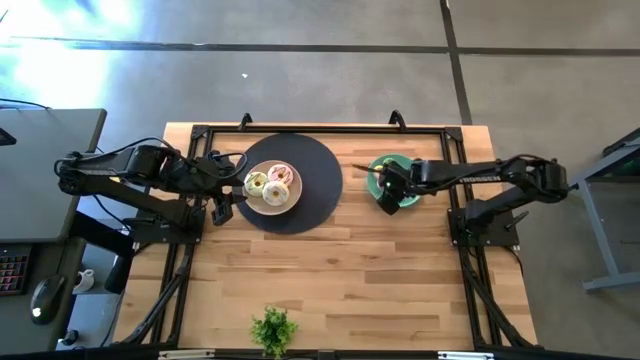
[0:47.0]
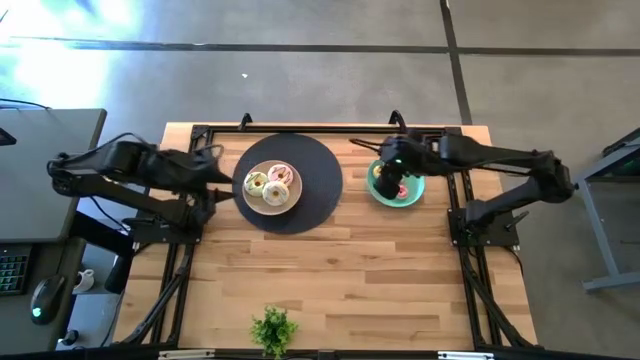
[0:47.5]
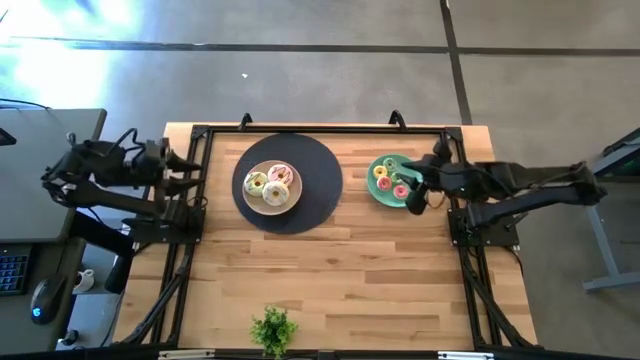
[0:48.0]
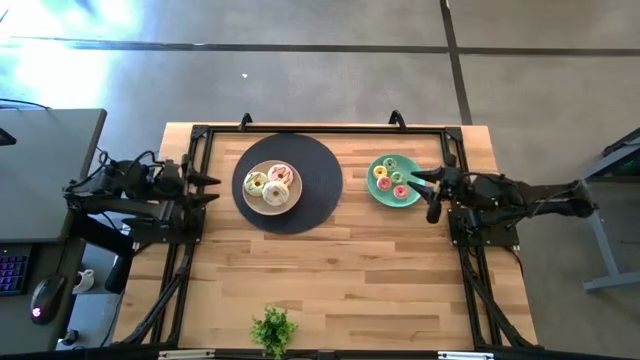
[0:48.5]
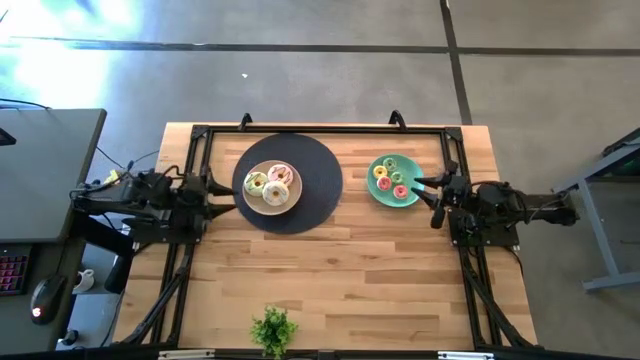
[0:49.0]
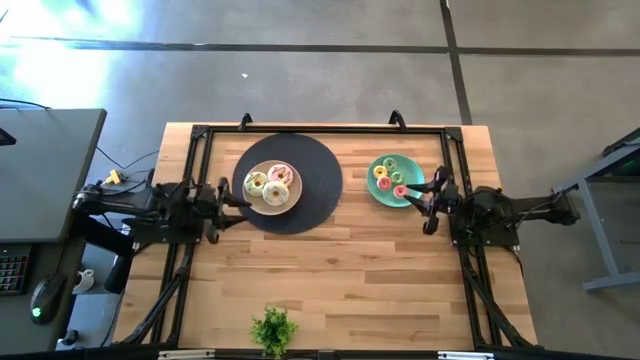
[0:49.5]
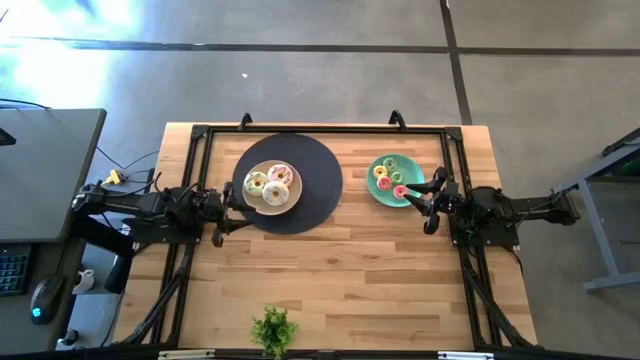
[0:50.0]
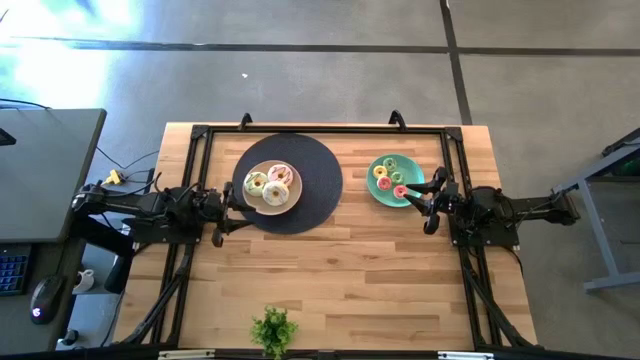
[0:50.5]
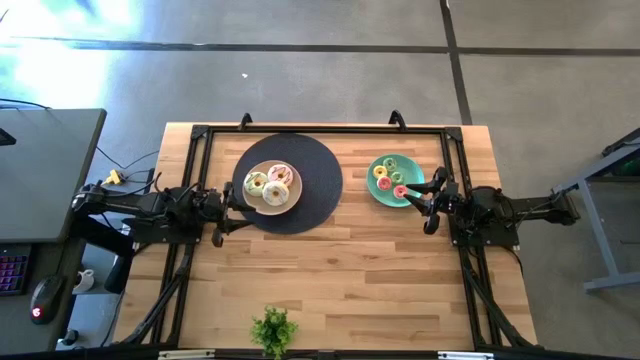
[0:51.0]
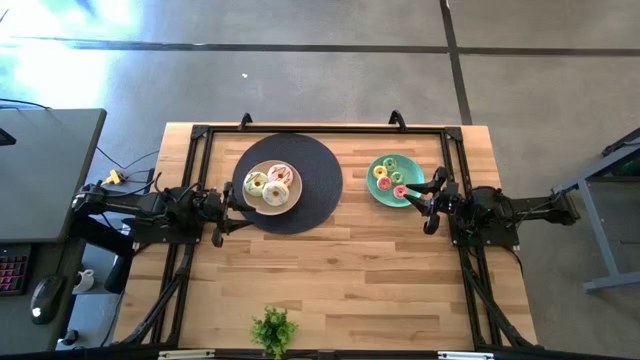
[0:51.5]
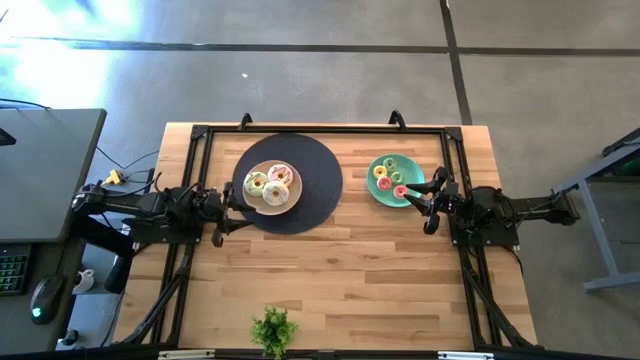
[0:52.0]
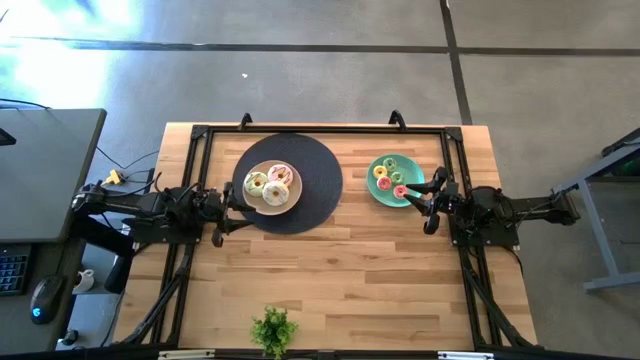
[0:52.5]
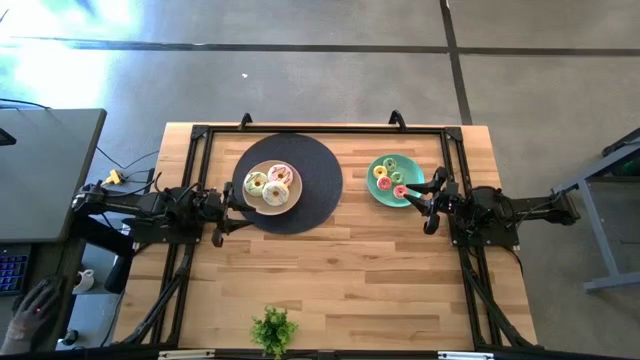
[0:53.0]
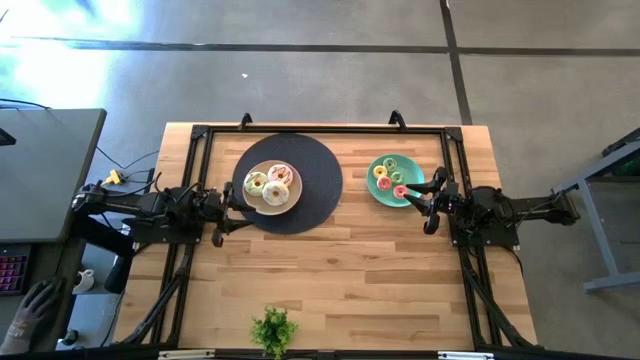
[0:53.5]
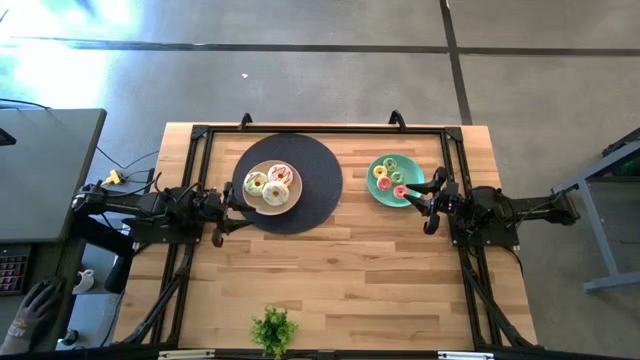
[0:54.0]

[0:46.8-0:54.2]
Task: Pick & Place donuts
Return to Home Position

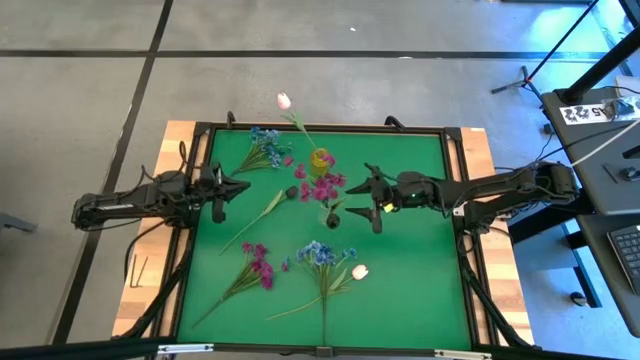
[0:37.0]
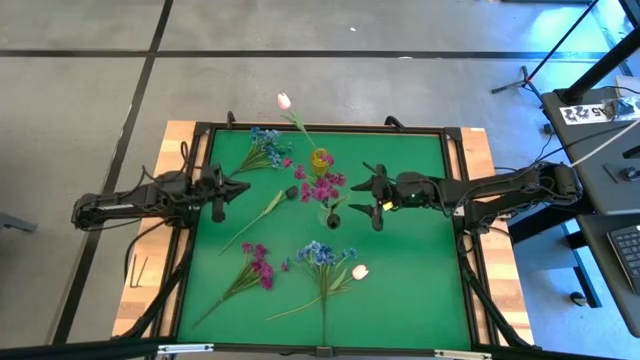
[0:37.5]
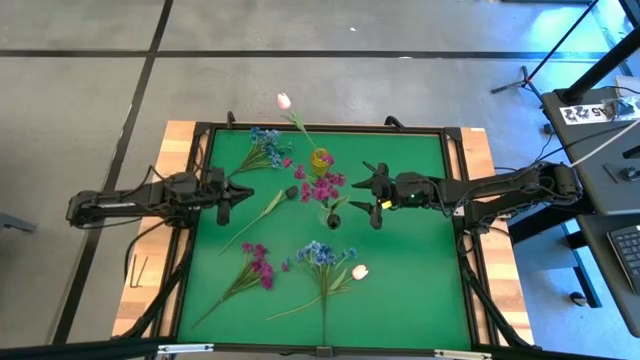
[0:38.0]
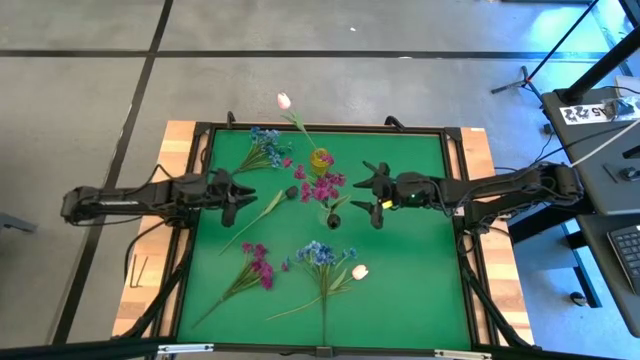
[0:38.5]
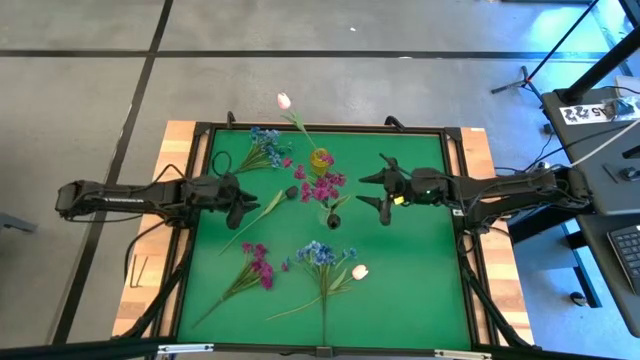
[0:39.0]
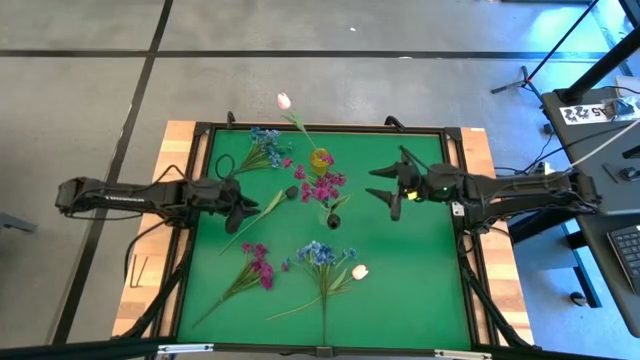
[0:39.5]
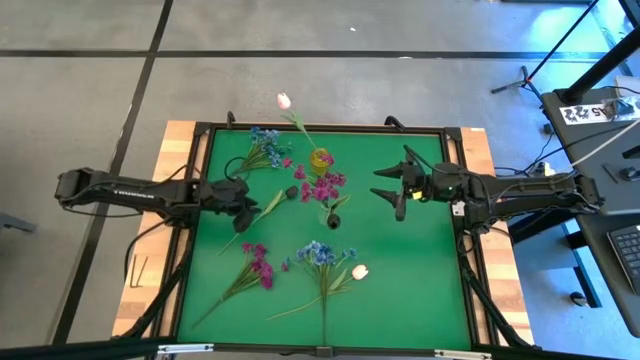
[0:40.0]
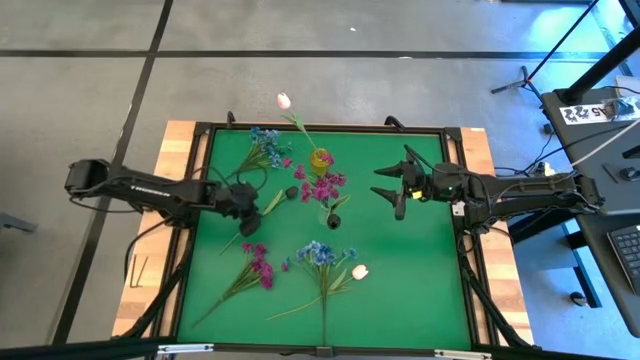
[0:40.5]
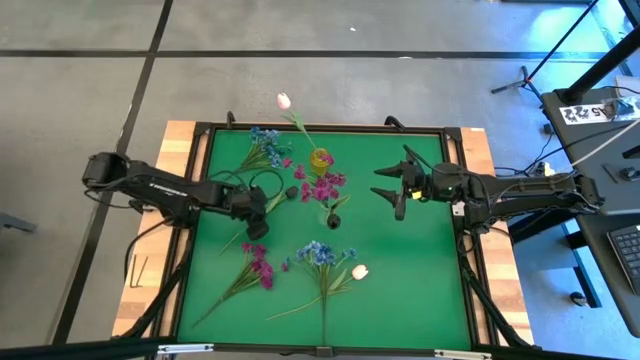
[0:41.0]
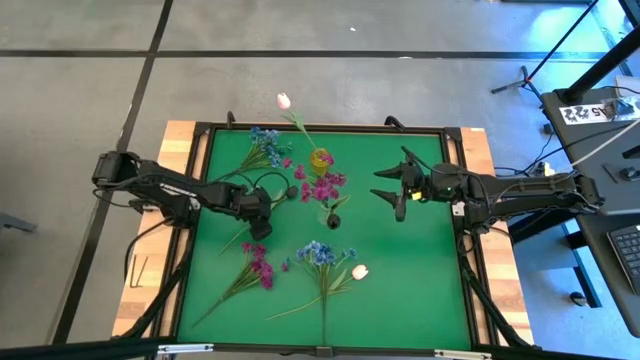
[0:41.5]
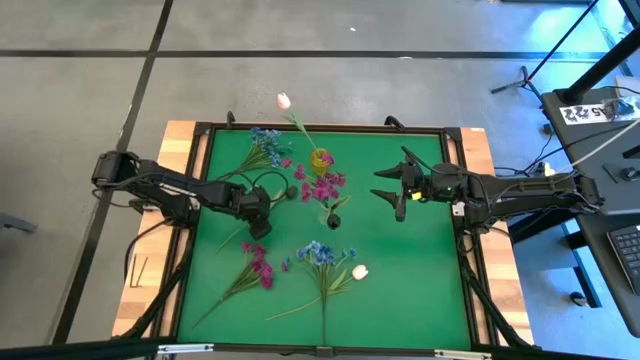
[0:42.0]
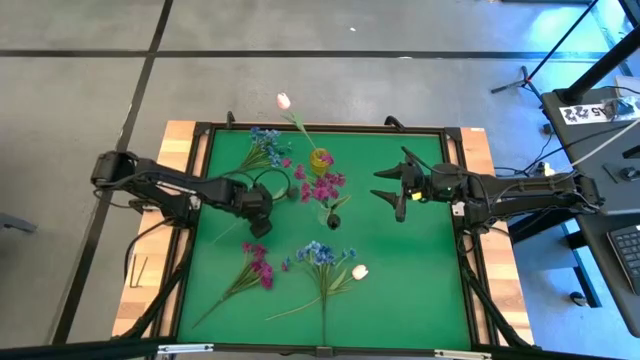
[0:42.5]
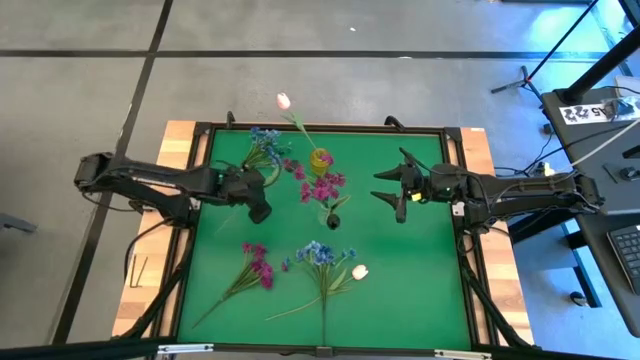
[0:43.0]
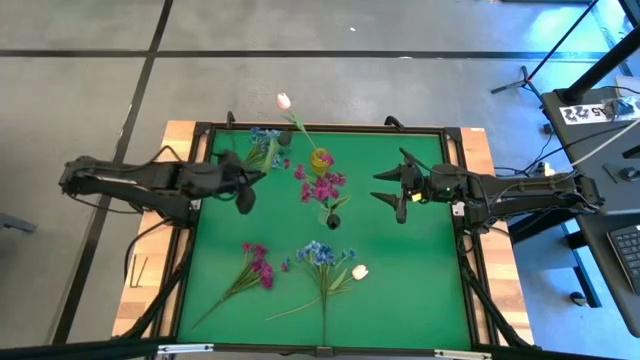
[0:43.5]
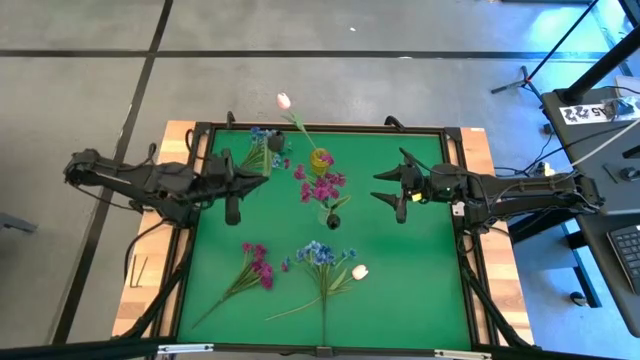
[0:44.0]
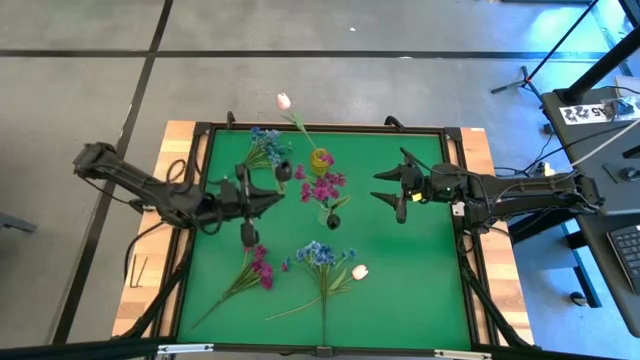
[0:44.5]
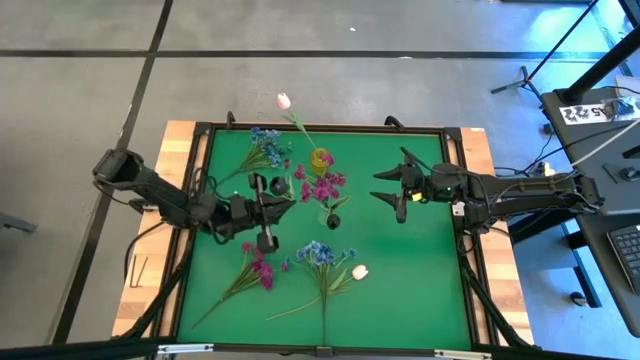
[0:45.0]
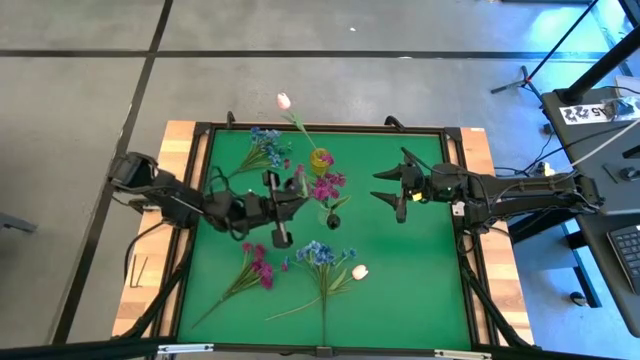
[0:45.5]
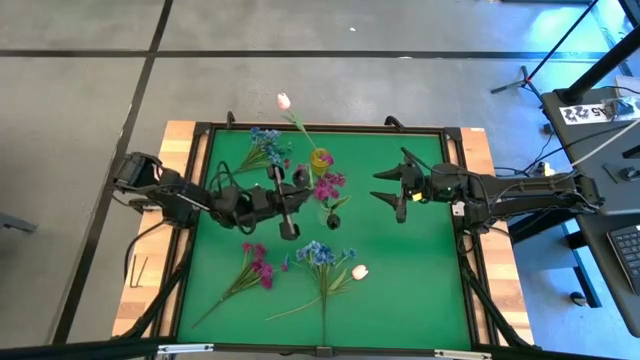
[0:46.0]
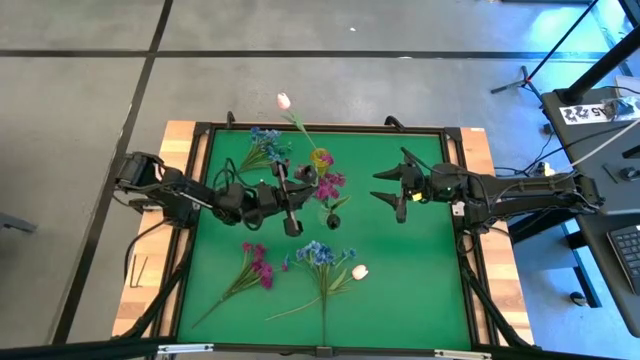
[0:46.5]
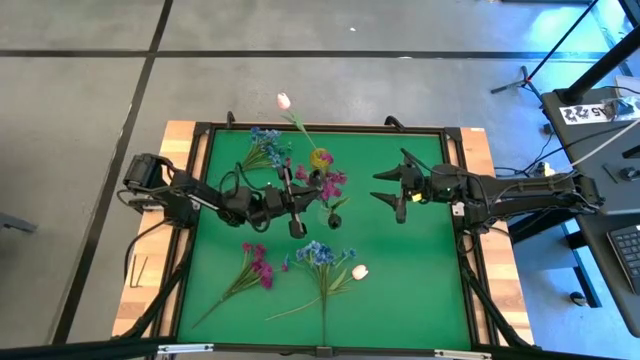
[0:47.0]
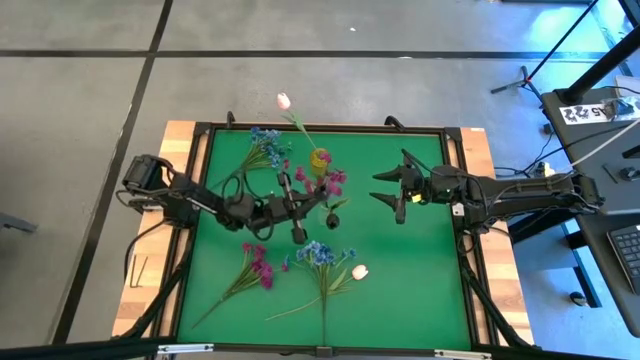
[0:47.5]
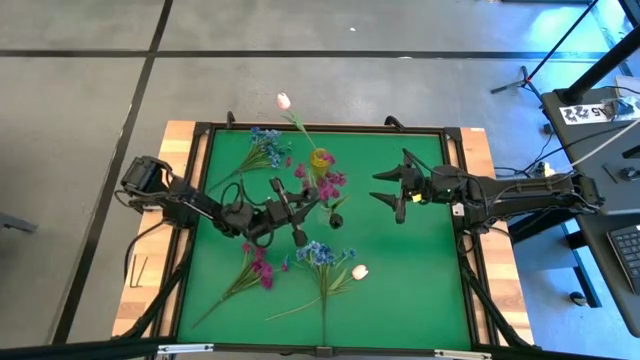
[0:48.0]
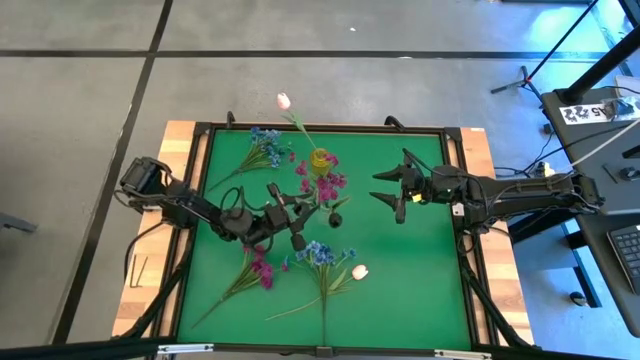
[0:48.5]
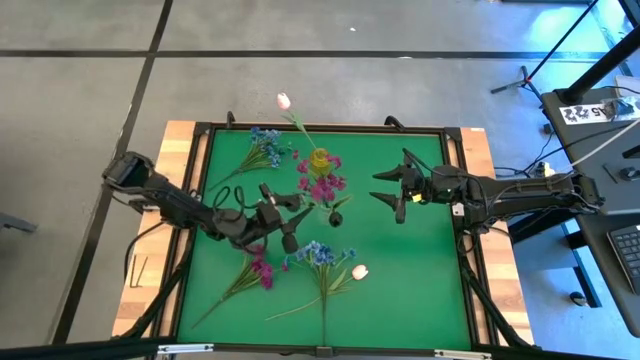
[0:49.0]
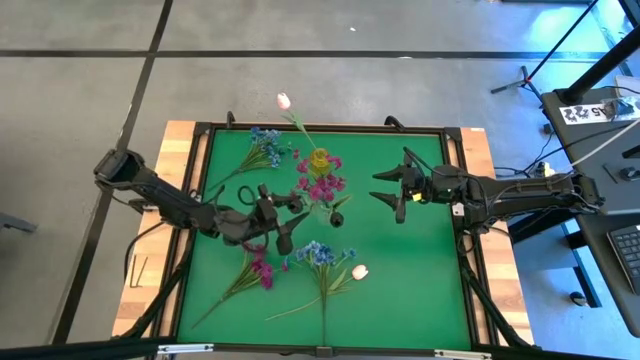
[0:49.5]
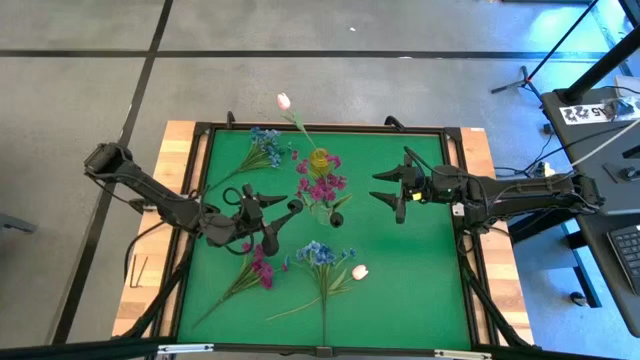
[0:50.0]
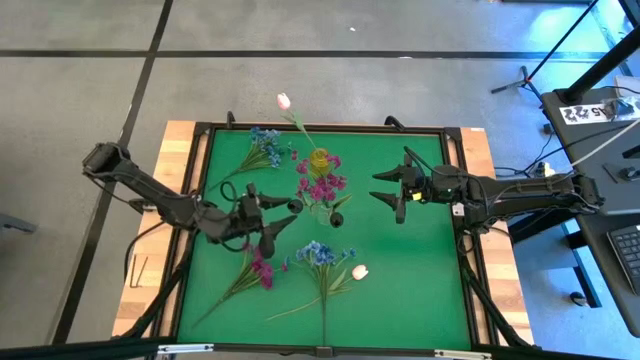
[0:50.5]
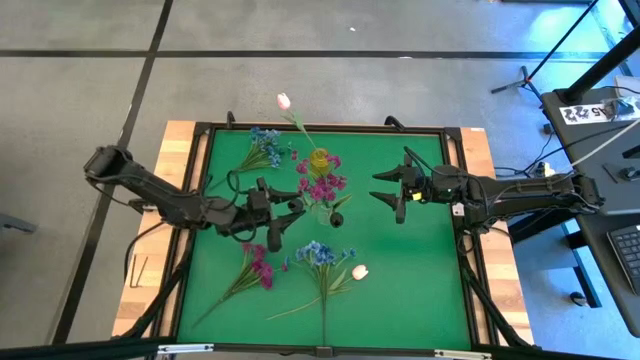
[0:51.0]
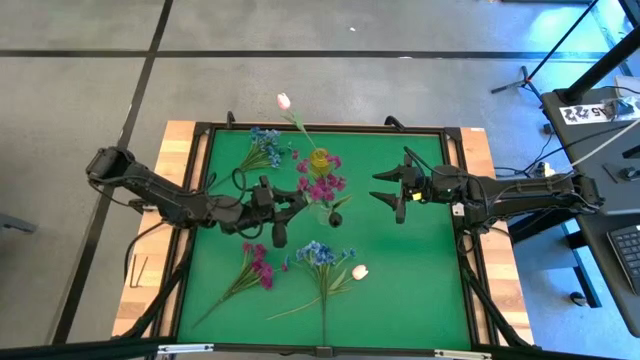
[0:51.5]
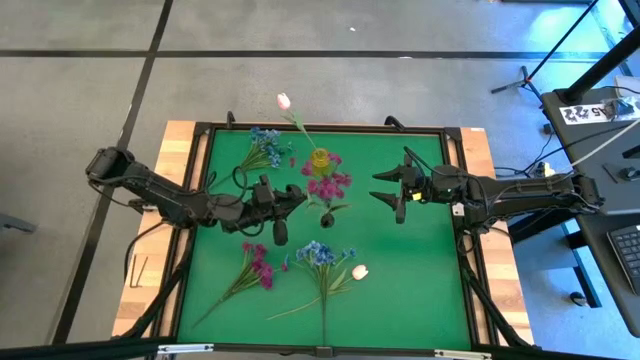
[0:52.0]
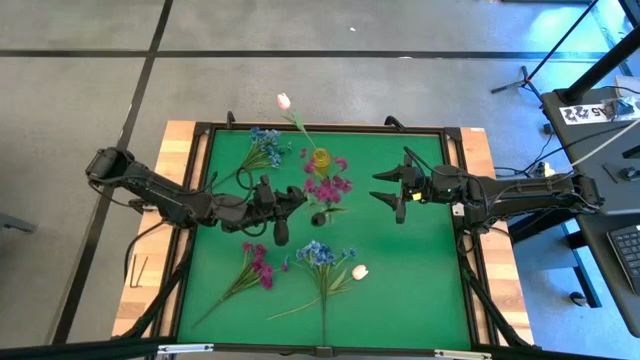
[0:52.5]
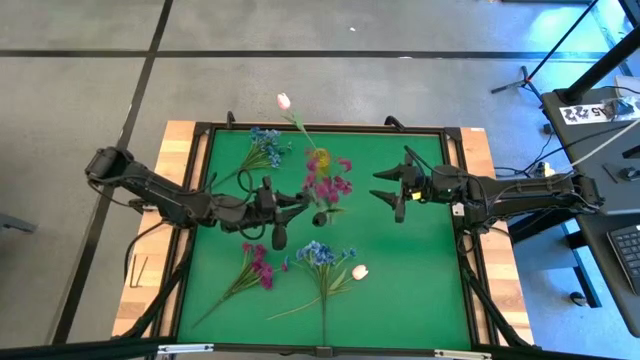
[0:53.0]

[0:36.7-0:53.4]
Task: Sort flowers into vase by color
Put the black tulip into transparent vase
